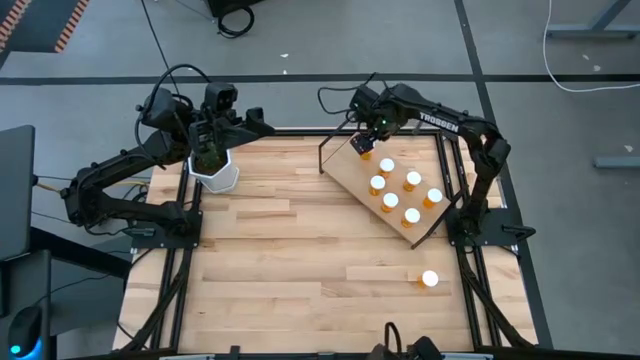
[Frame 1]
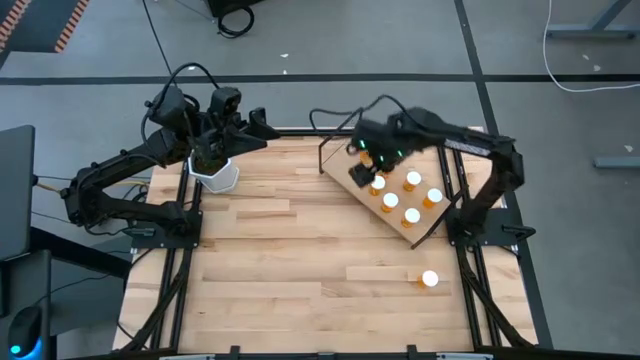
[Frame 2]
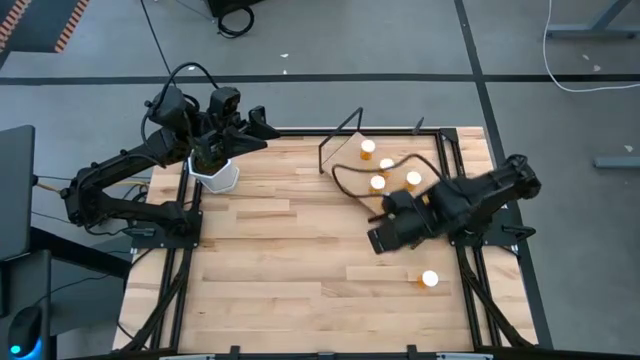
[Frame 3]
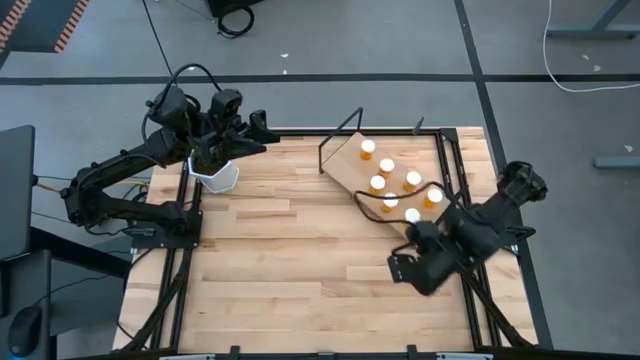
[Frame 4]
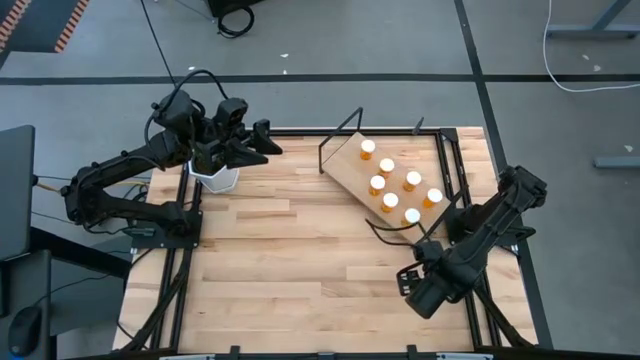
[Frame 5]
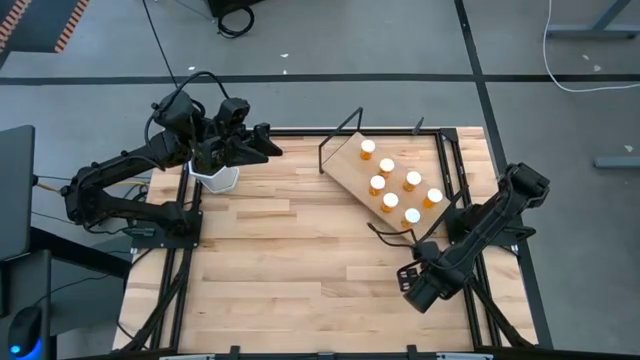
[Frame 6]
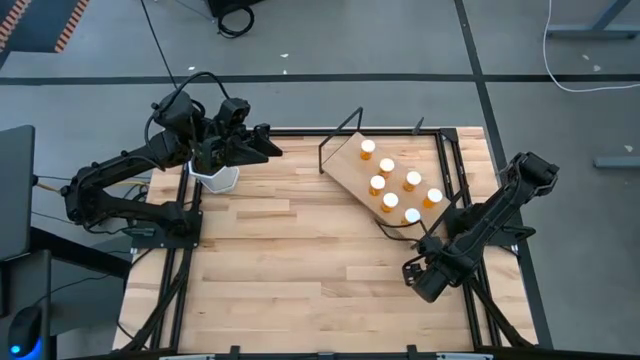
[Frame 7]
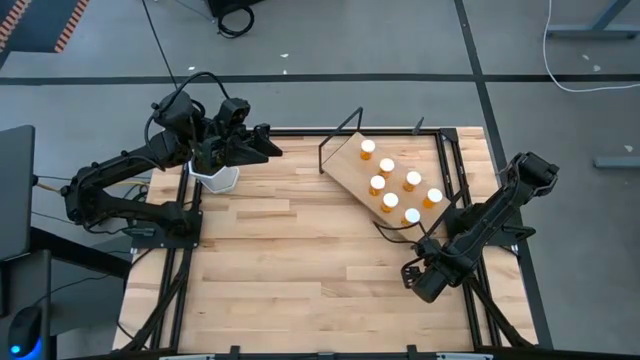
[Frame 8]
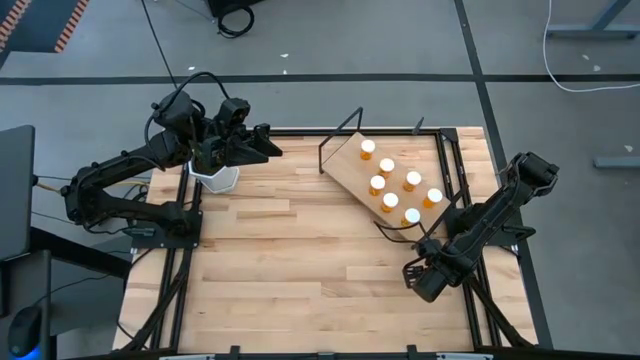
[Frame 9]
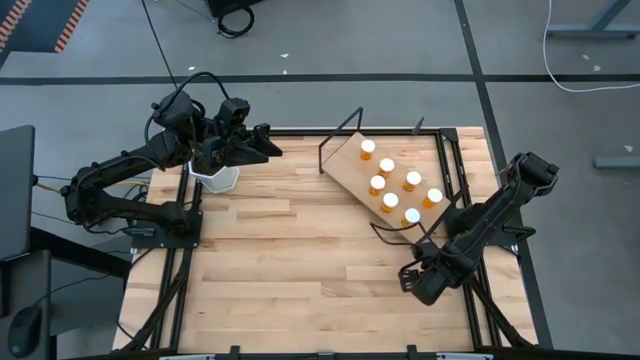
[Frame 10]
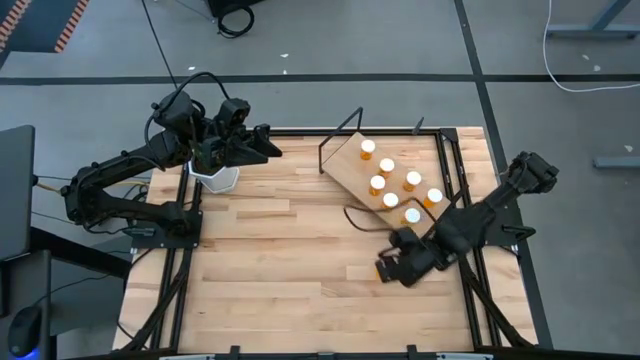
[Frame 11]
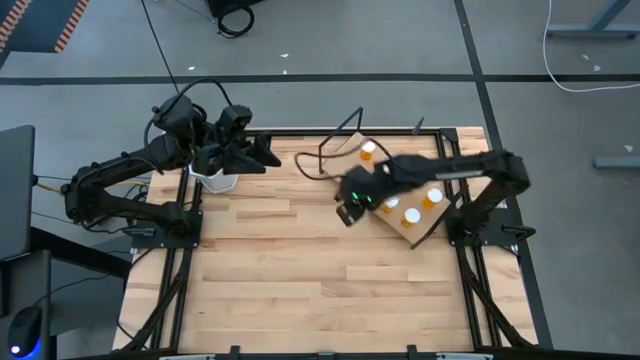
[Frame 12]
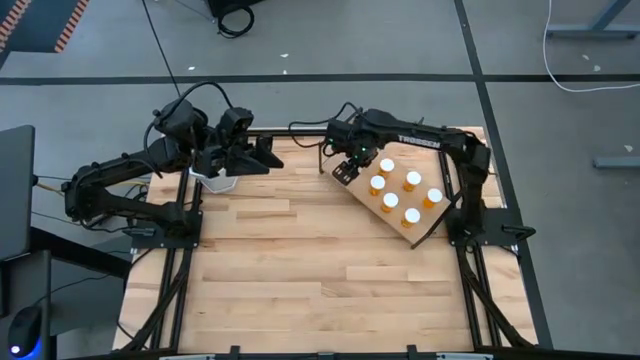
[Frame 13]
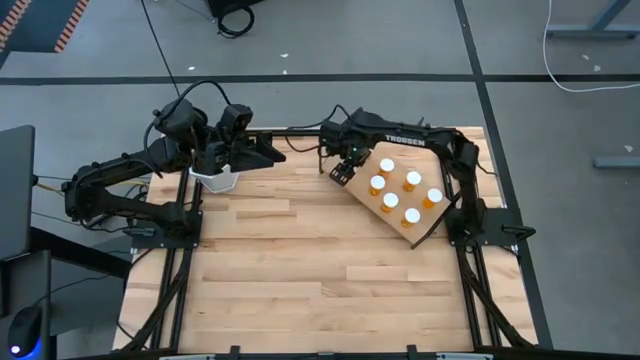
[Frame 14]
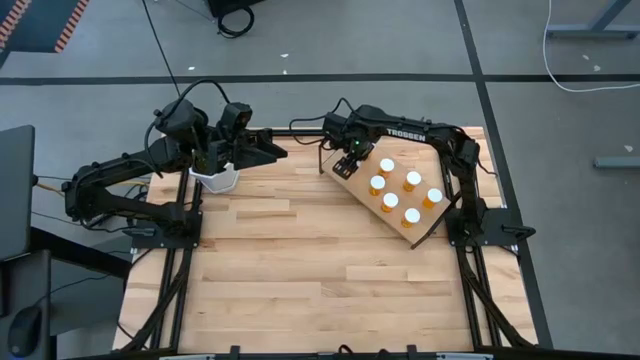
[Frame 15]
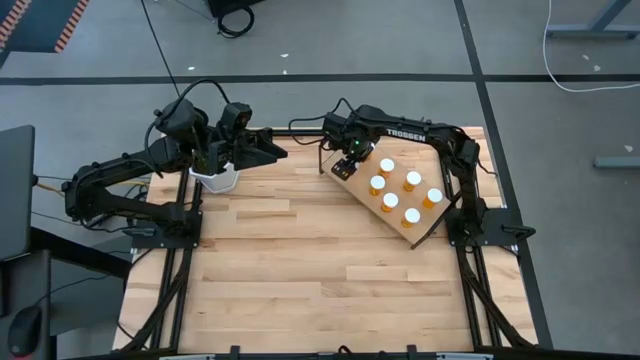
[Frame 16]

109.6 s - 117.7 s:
Task: Pick and place medicine bottles onto shelf by color
Put the orange pill bottle on the shelf aligned with the left orange pill bottle

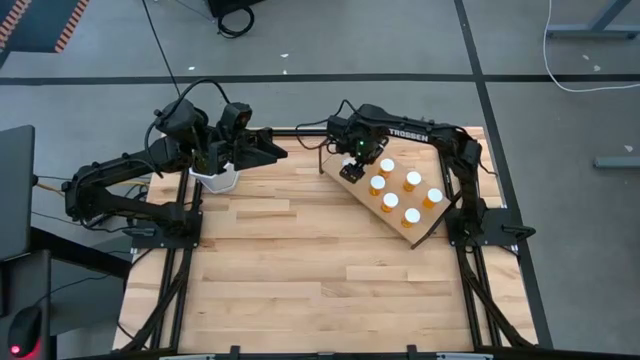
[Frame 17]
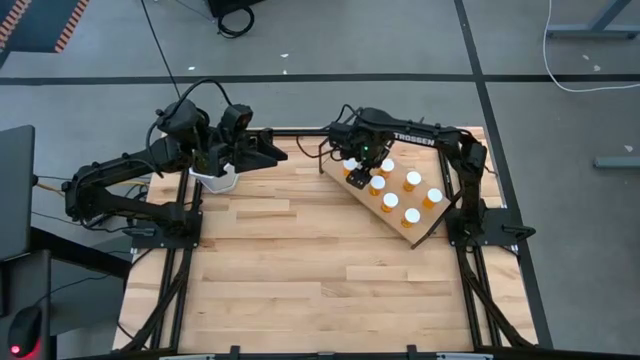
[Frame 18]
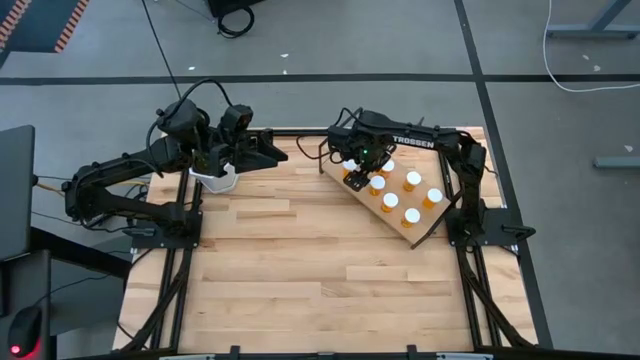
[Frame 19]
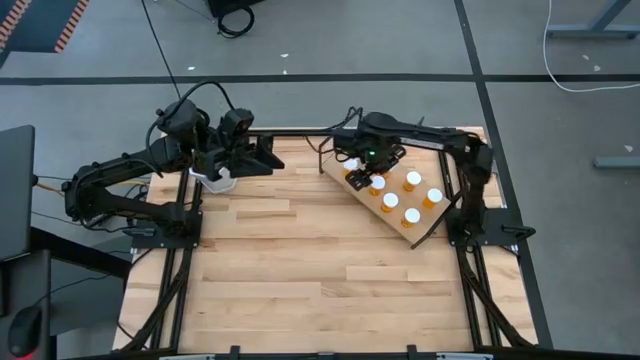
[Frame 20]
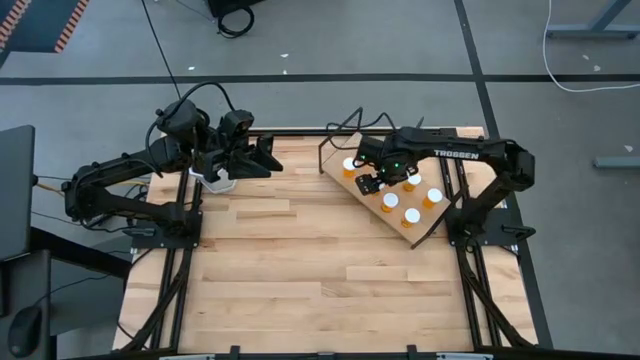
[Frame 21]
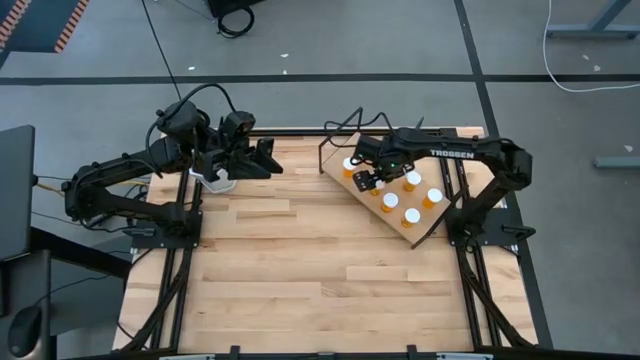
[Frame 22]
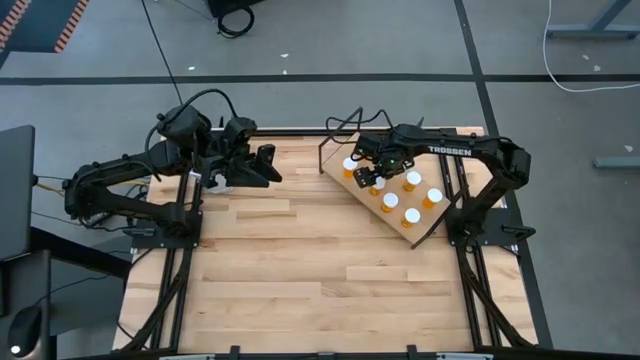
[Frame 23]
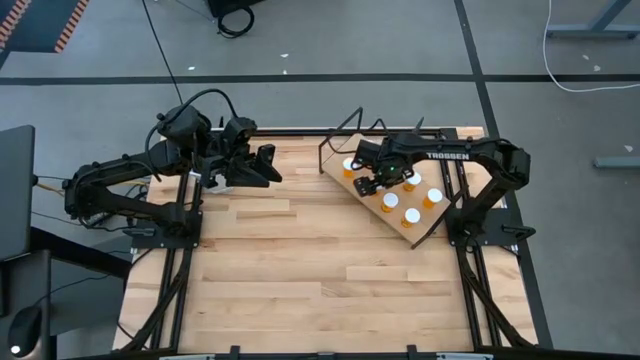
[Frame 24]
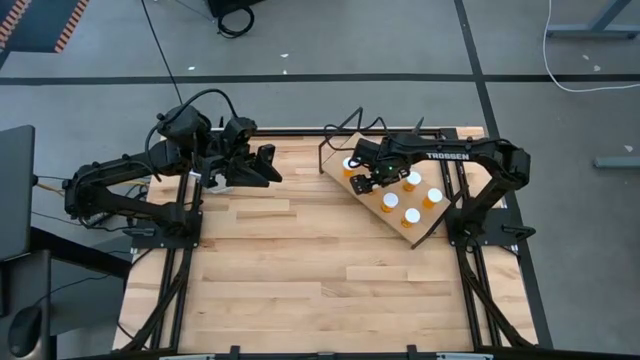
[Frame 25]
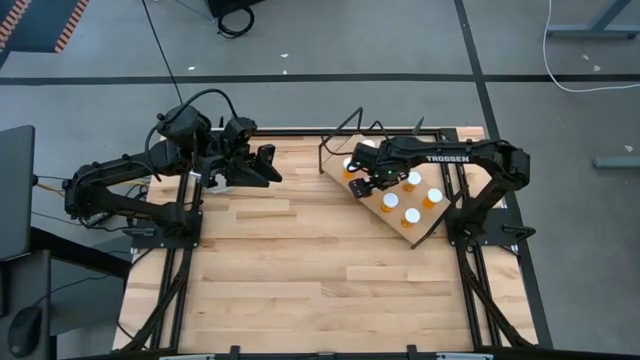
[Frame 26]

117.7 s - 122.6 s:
Adjust the middle left orange pill bottle on the shelf

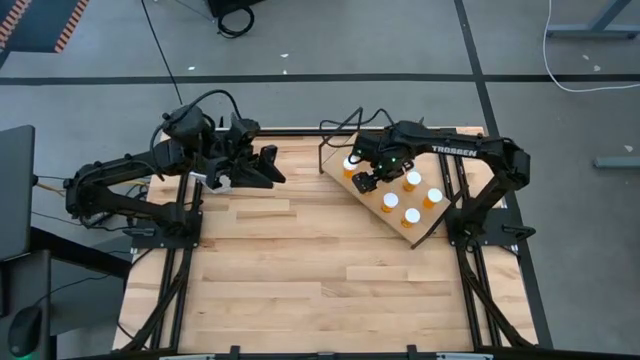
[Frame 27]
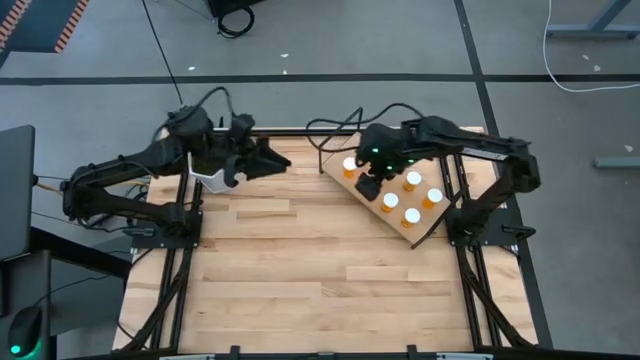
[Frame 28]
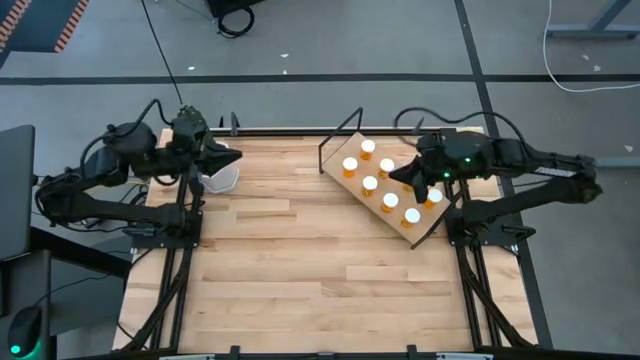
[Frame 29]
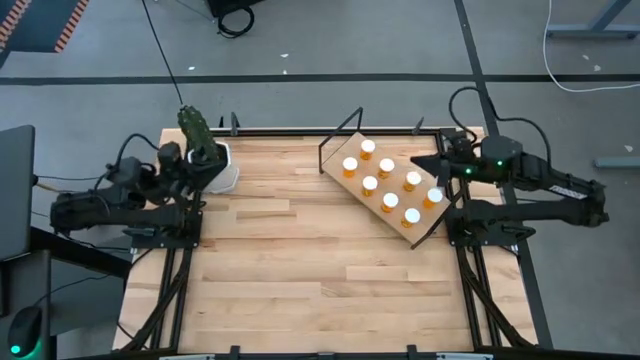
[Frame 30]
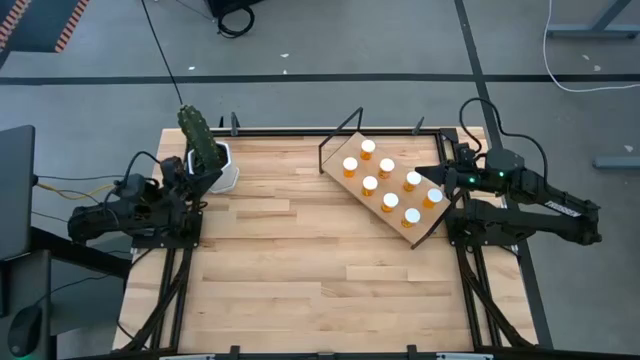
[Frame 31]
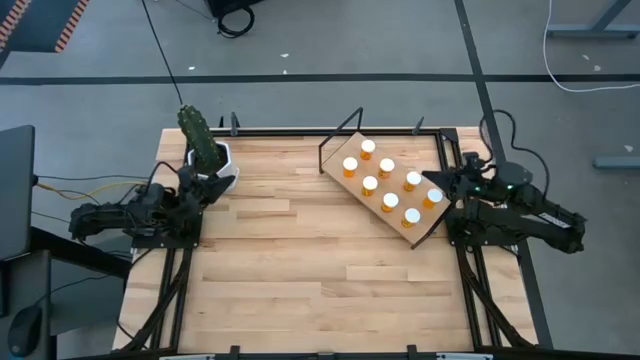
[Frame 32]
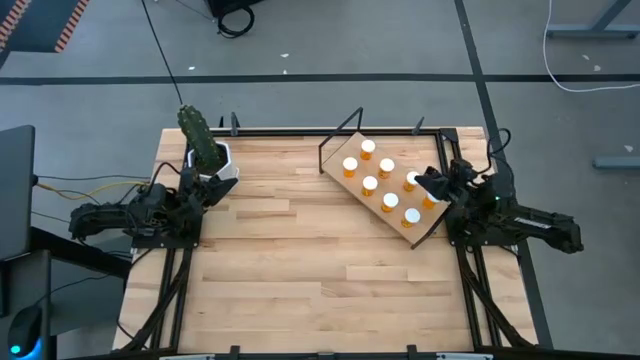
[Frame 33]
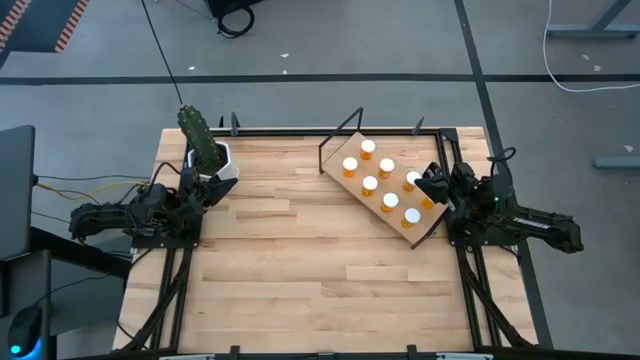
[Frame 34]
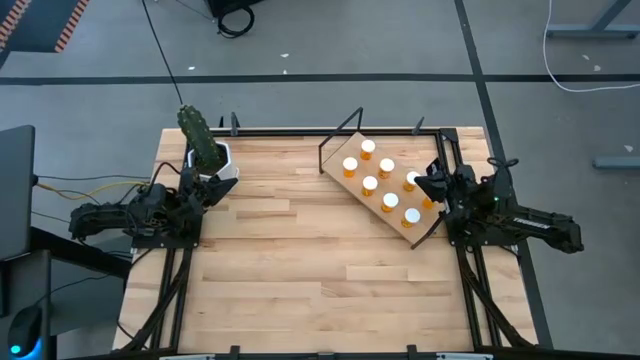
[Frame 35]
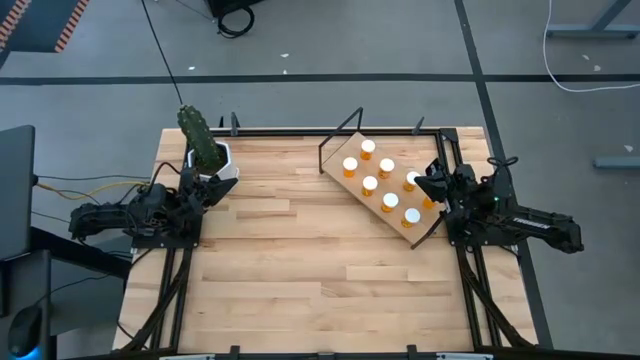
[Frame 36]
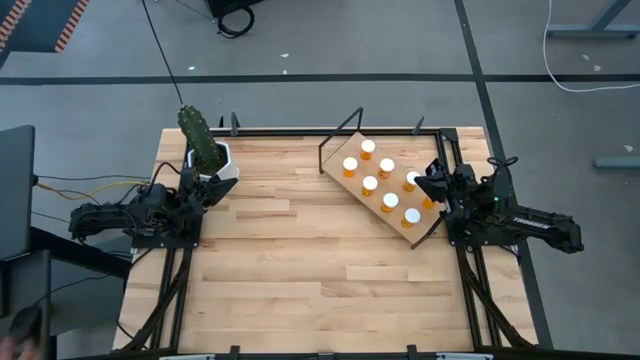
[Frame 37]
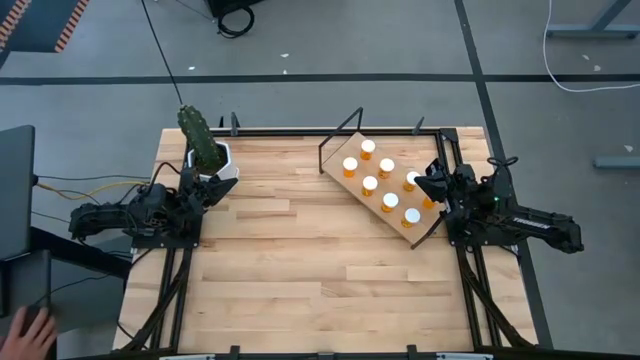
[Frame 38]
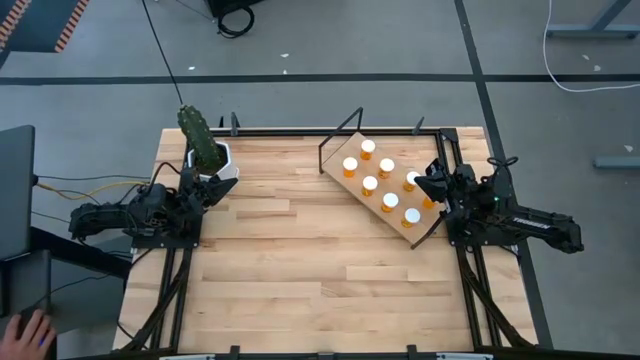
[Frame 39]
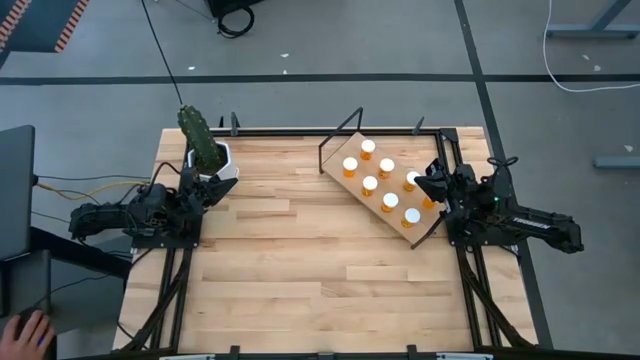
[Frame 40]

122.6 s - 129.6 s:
Return to Home Position
